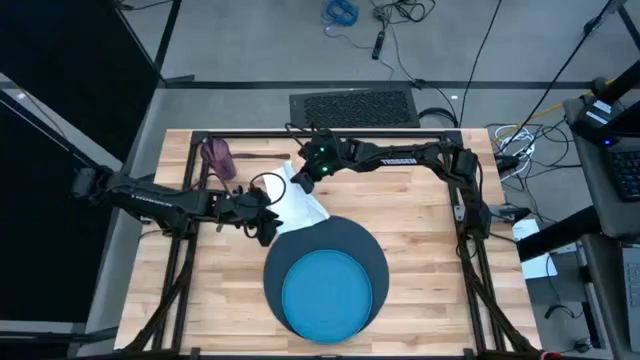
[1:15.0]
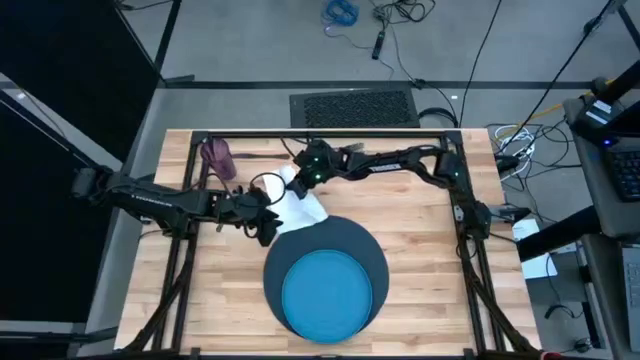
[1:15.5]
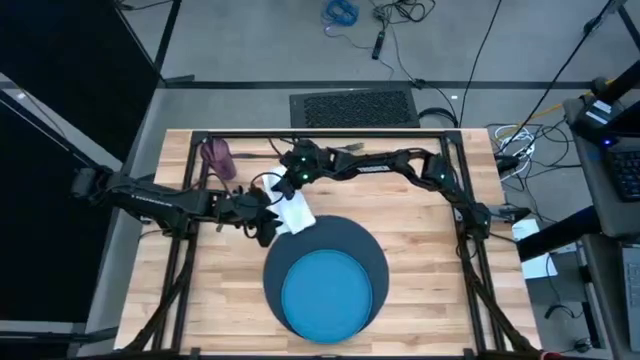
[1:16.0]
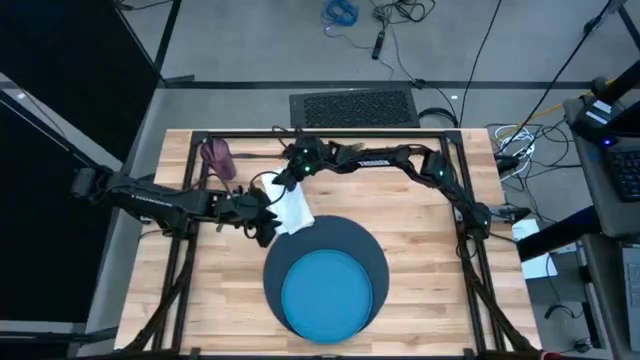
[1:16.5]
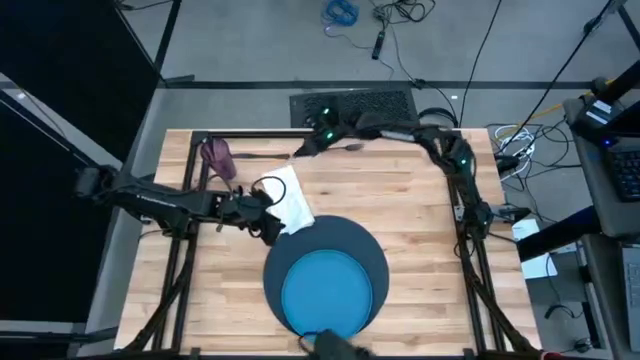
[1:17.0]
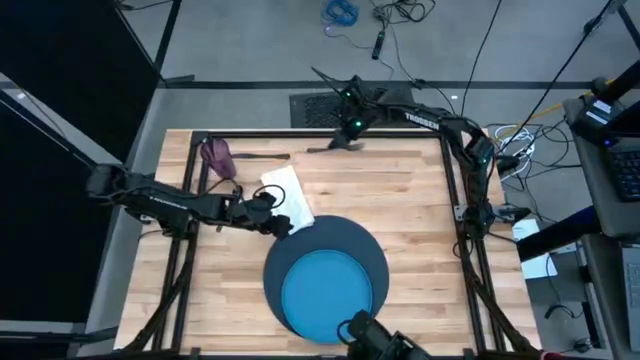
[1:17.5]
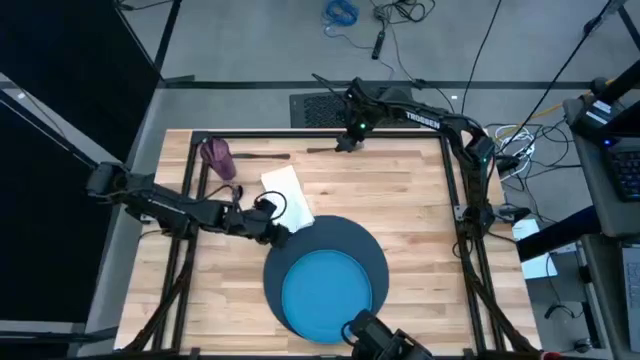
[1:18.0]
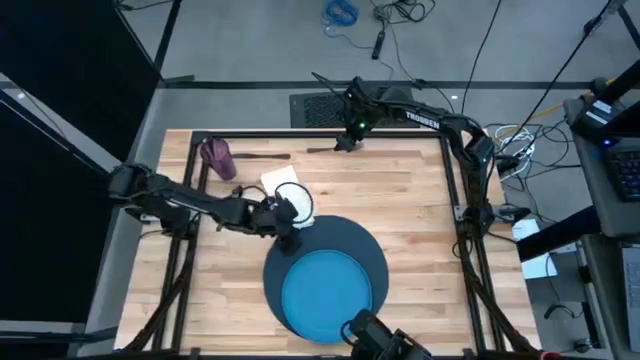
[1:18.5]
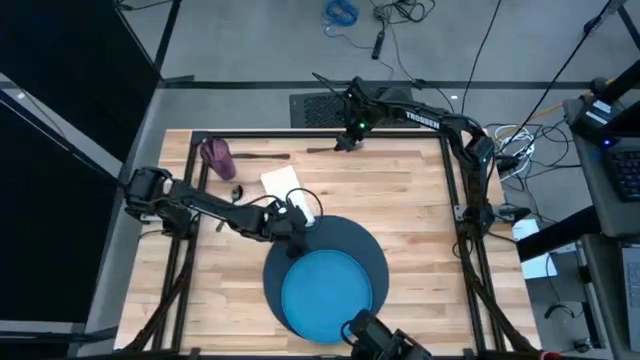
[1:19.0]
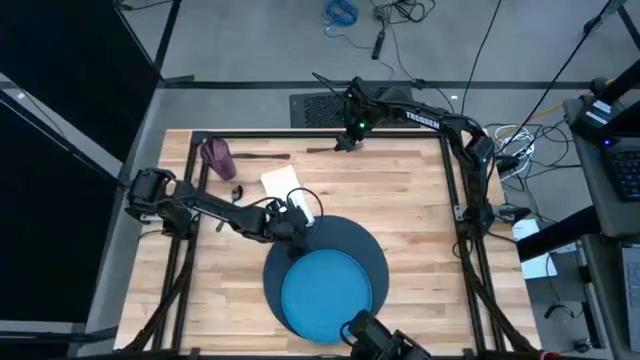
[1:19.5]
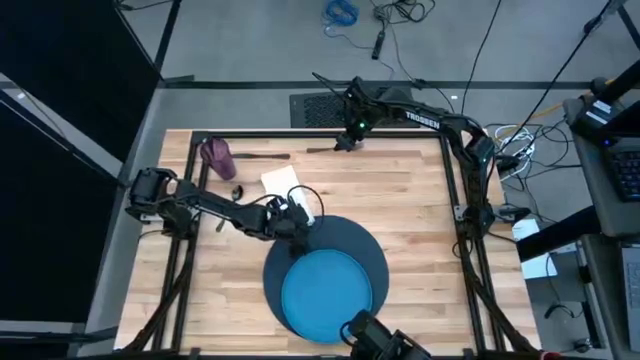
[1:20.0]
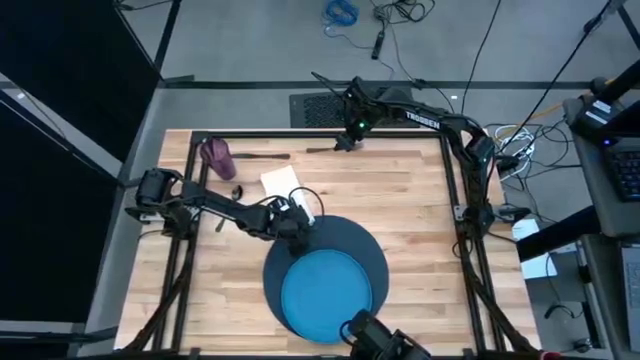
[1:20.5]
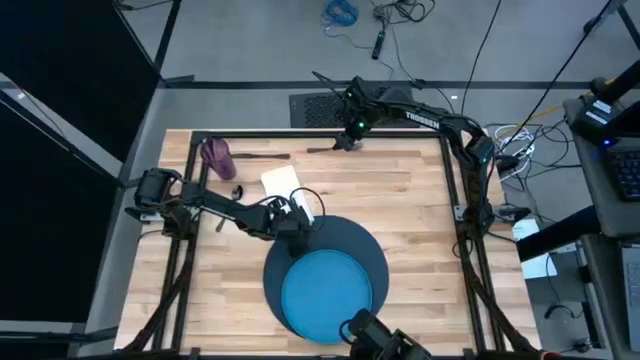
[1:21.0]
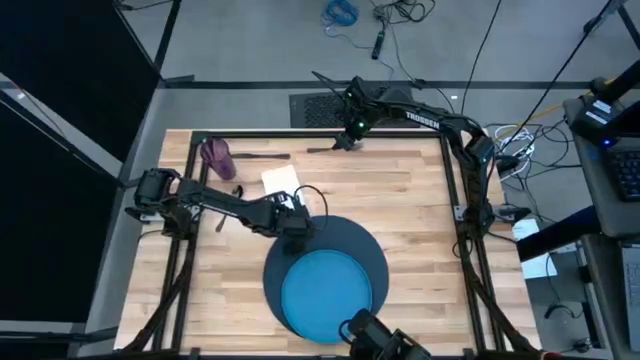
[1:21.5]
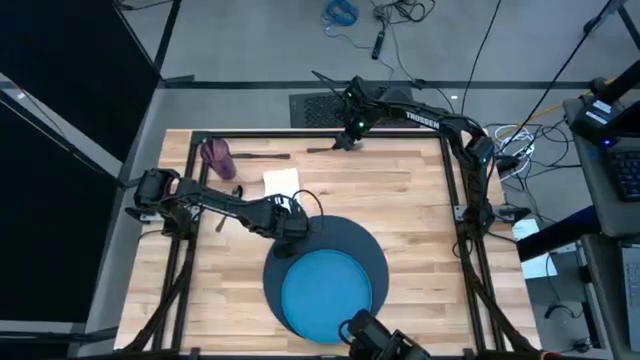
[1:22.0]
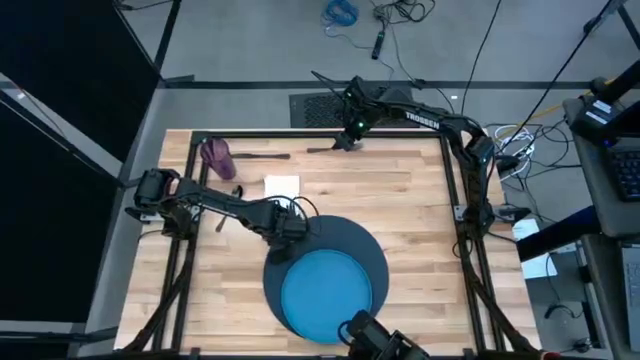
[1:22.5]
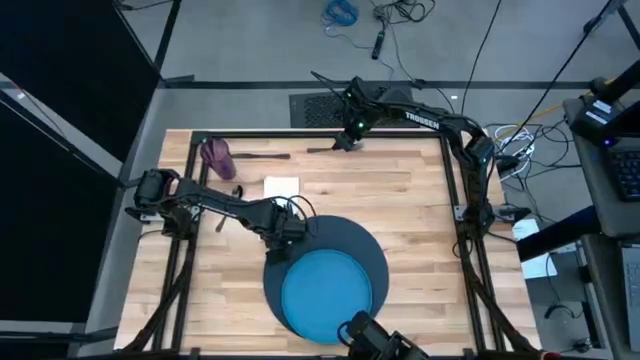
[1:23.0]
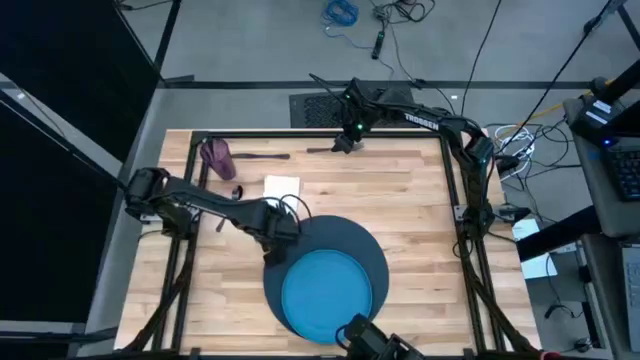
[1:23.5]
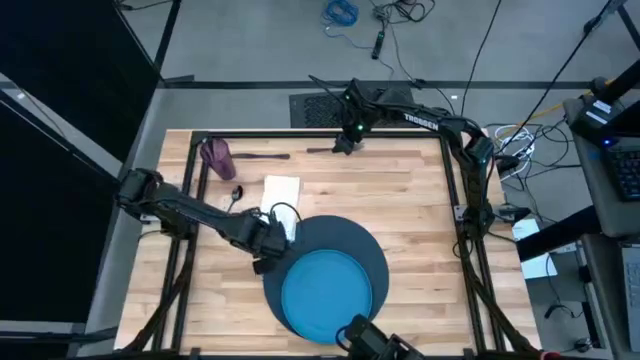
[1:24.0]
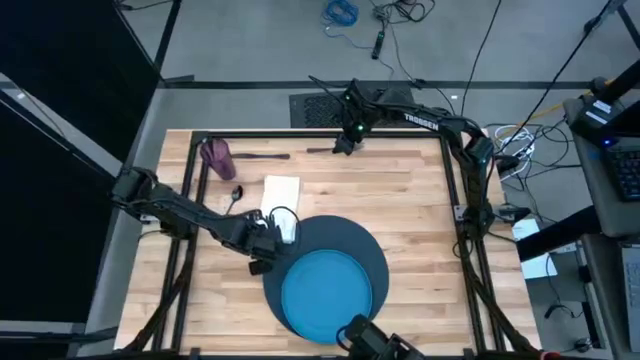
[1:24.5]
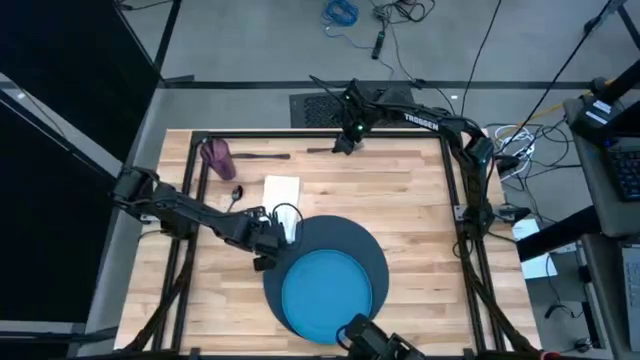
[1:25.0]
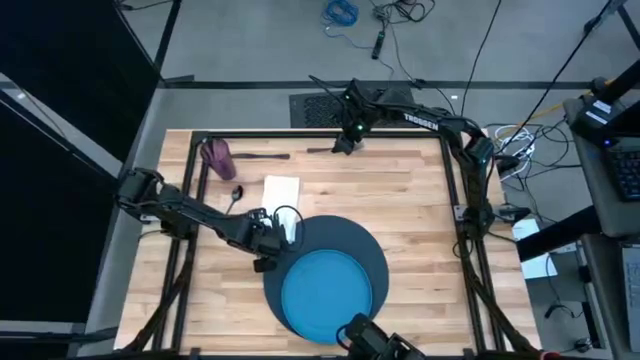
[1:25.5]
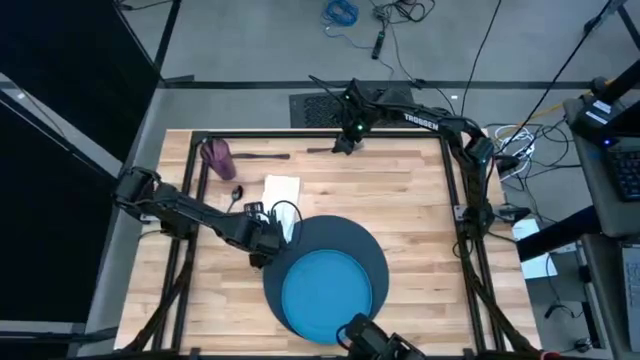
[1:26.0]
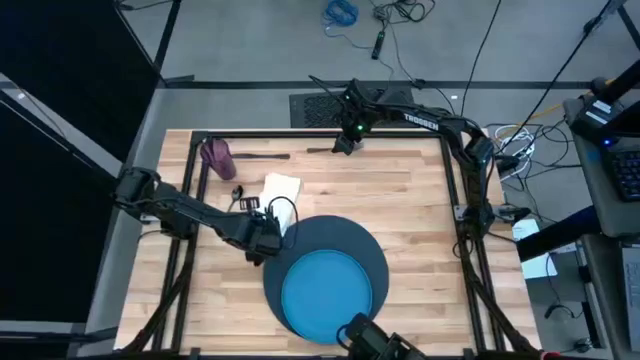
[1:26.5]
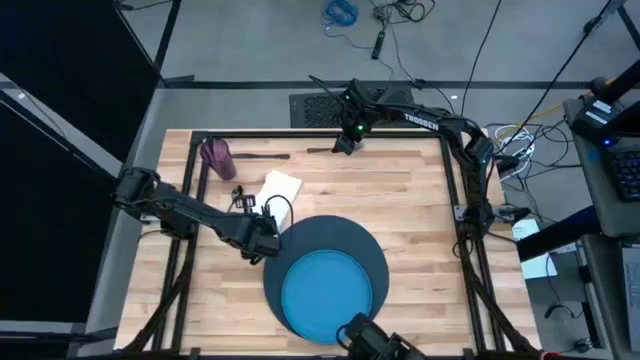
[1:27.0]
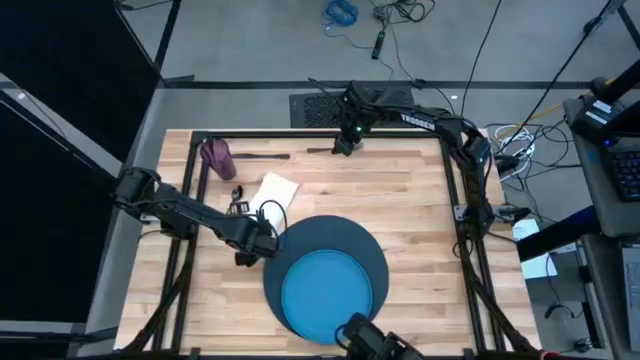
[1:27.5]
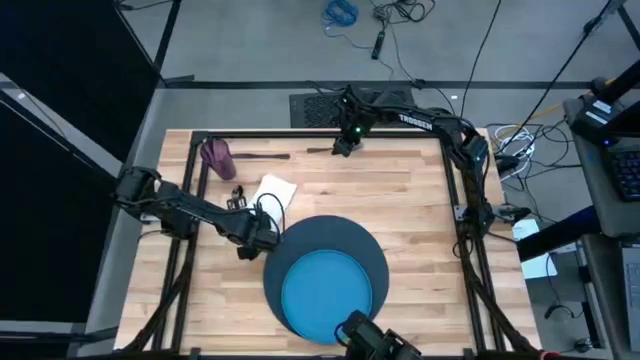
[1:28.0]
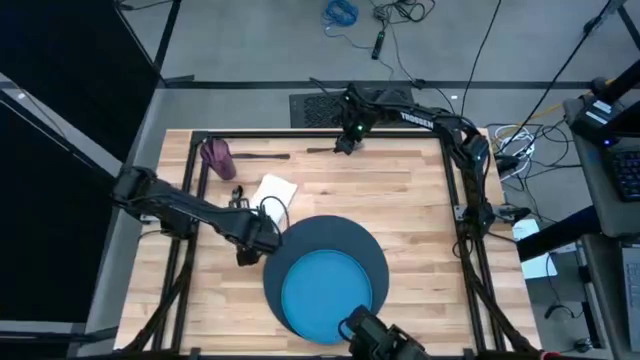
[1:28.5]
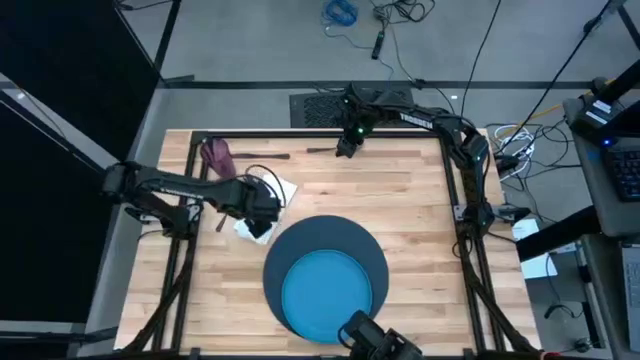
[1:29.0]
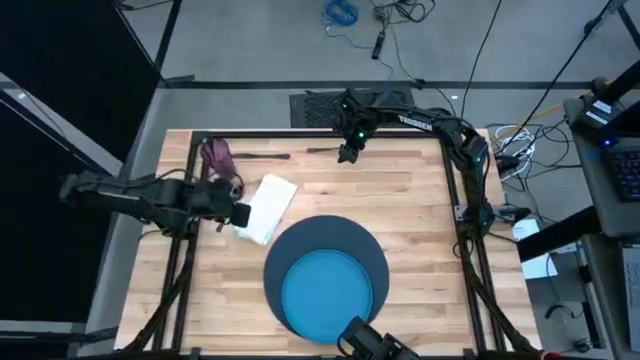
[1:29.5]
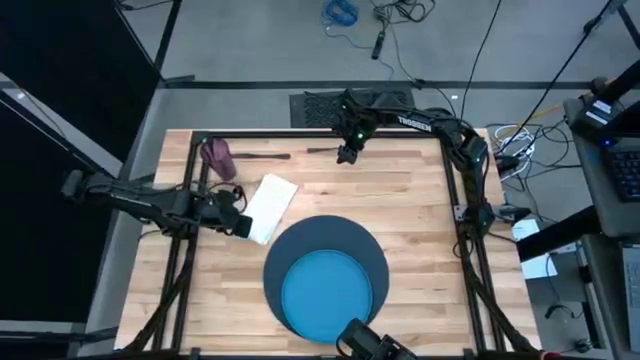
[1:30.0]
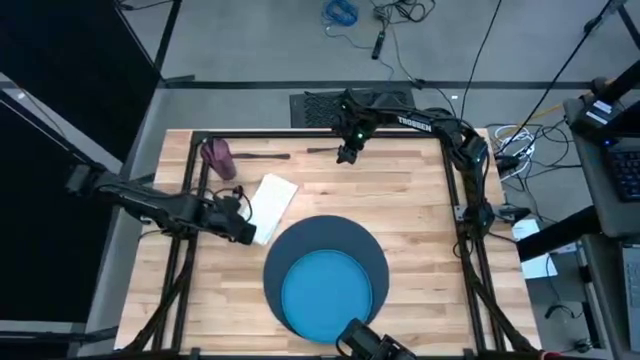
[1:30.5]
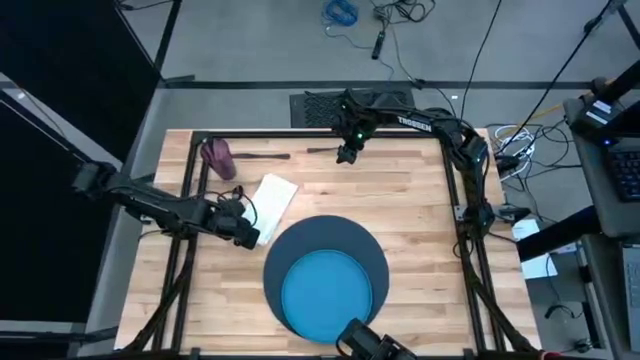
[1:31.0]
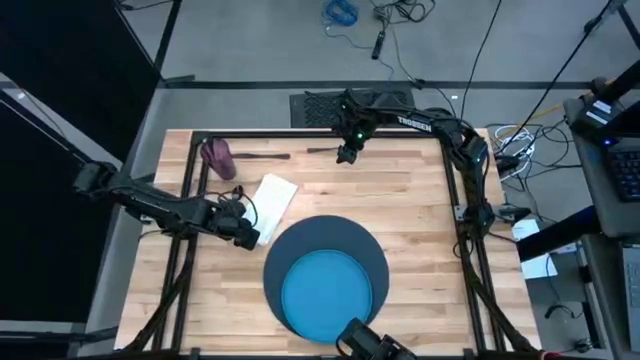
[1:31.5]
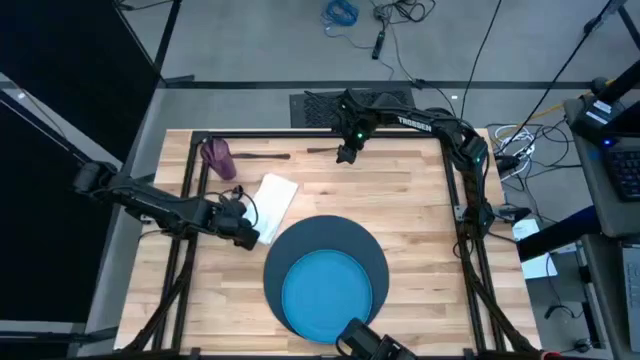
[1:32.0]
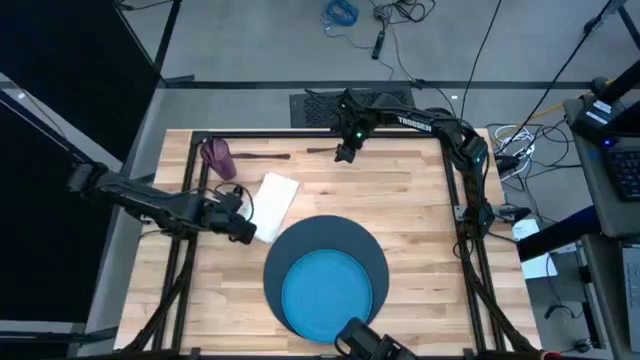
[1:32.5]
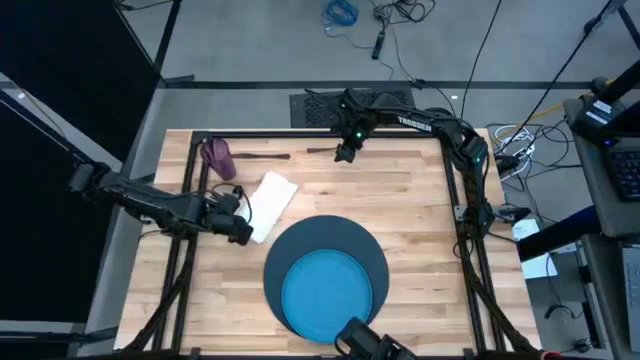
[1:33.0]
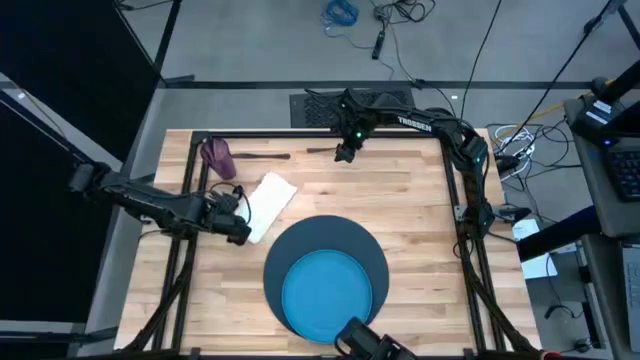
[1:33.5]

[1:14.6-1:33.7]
Task: Set table place
Fold the white table napkin

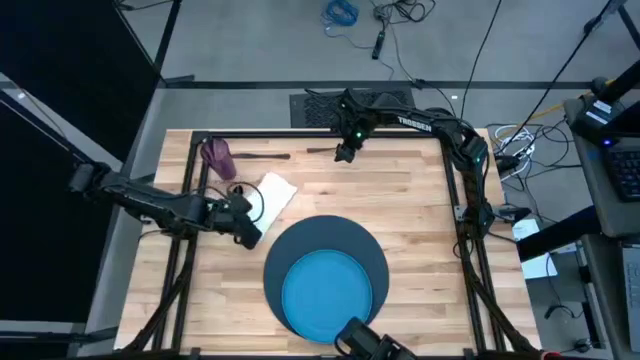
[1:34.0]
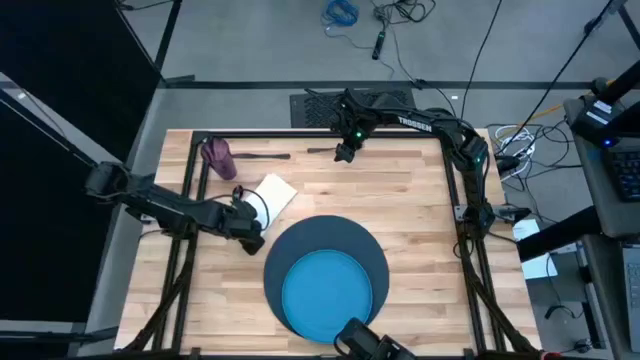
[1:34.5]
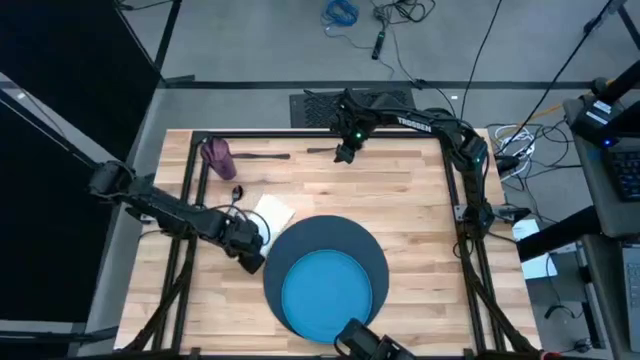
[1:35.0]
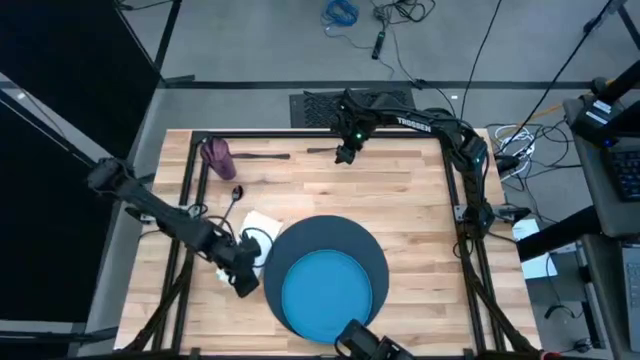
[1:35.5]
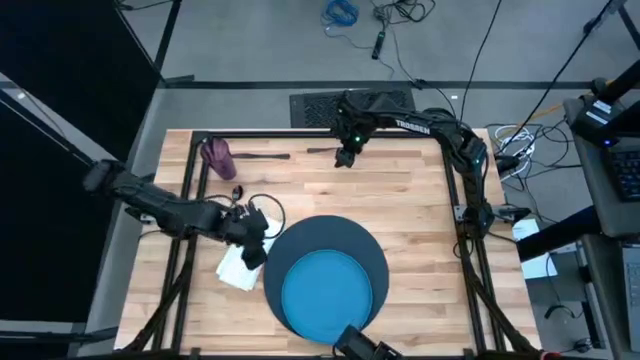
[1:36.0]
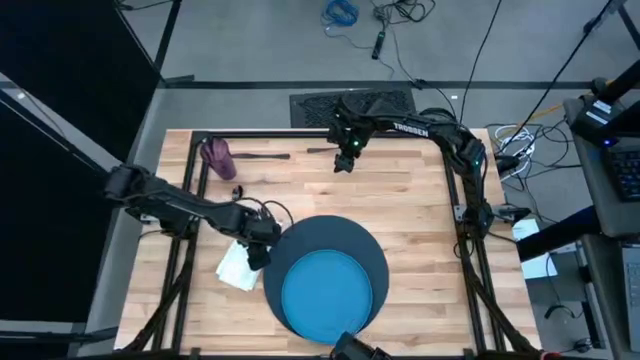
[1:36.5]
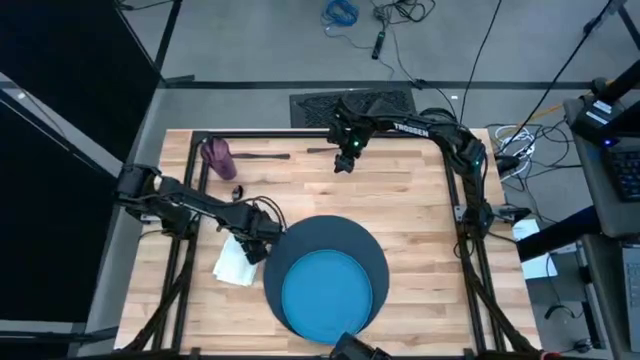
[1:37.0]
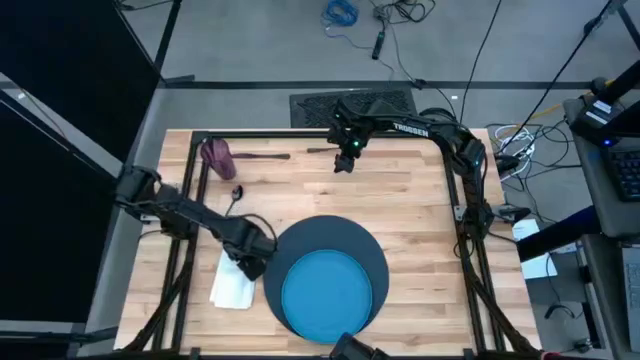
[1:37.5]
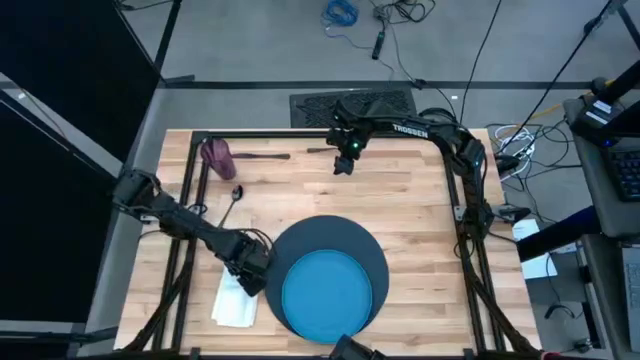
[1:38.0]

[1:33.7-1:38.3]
Move the white table napkin to the left side of the table mat
